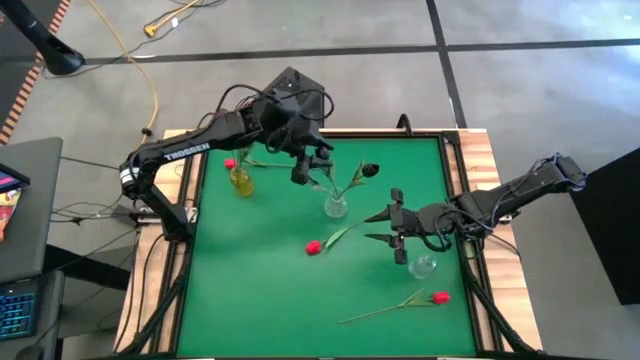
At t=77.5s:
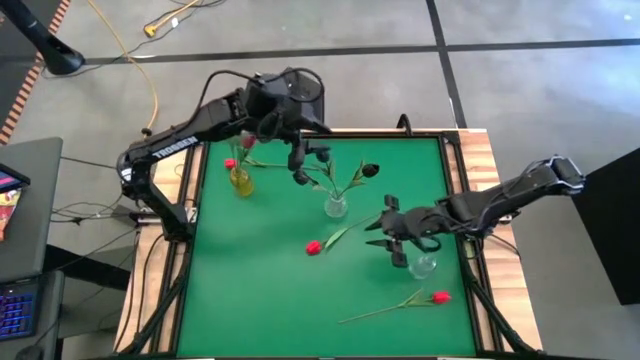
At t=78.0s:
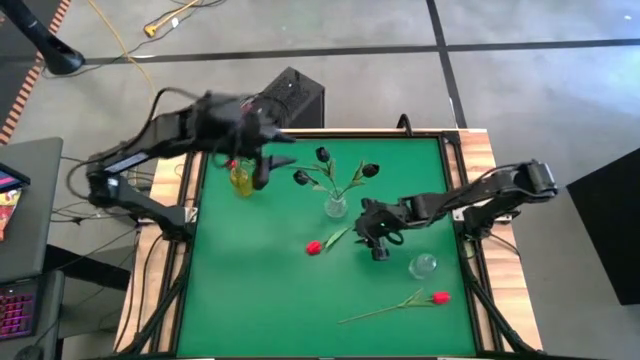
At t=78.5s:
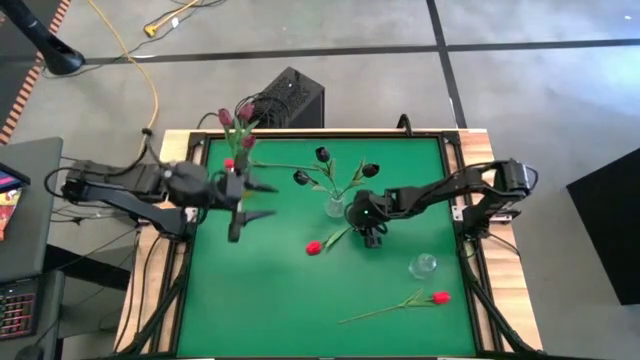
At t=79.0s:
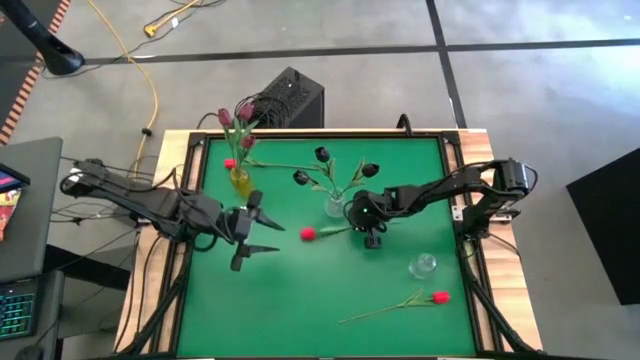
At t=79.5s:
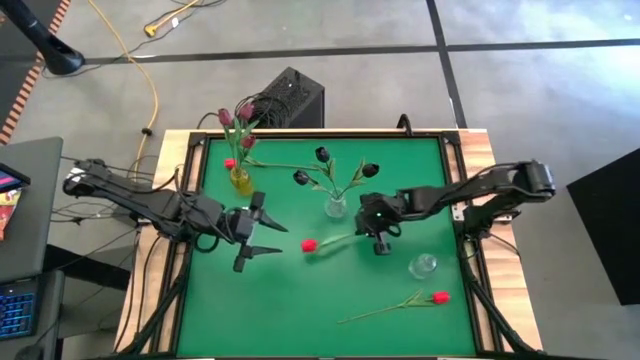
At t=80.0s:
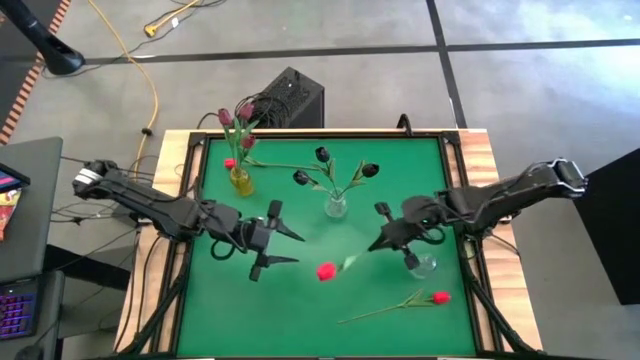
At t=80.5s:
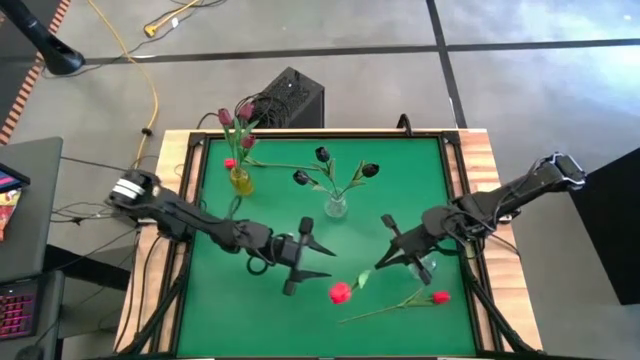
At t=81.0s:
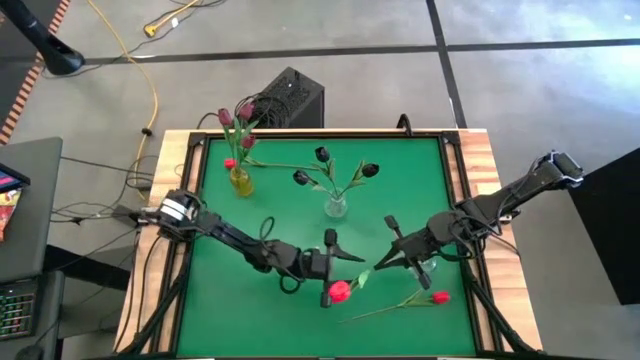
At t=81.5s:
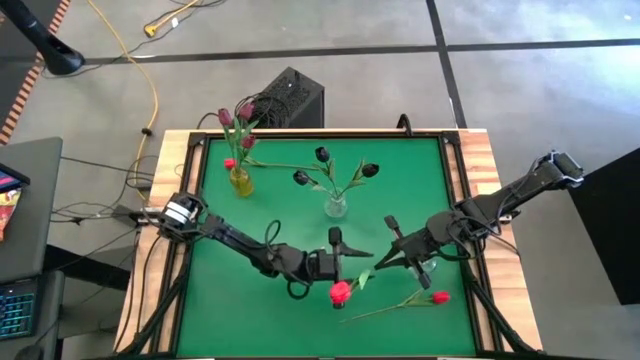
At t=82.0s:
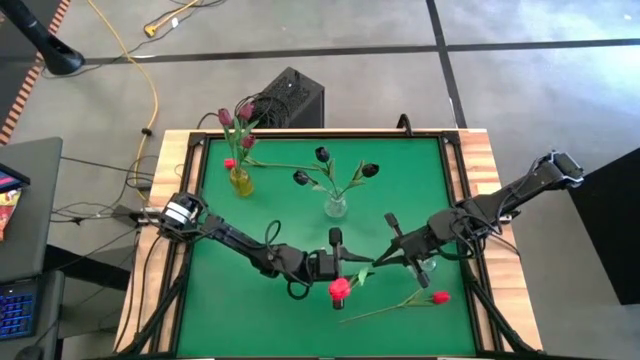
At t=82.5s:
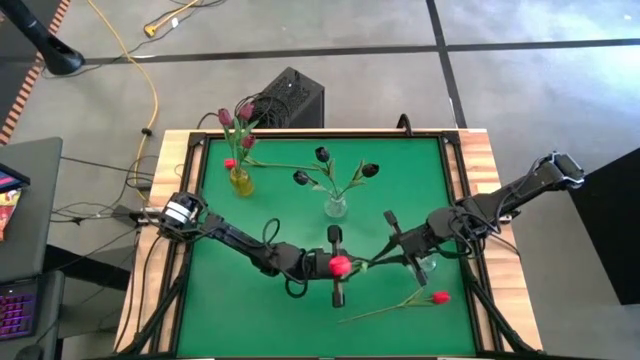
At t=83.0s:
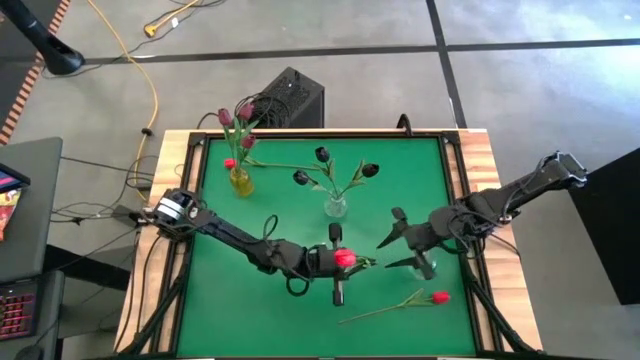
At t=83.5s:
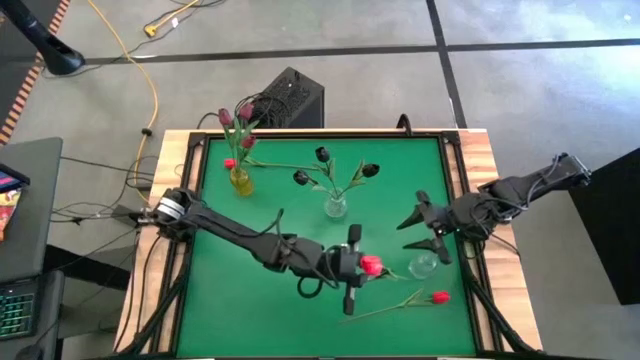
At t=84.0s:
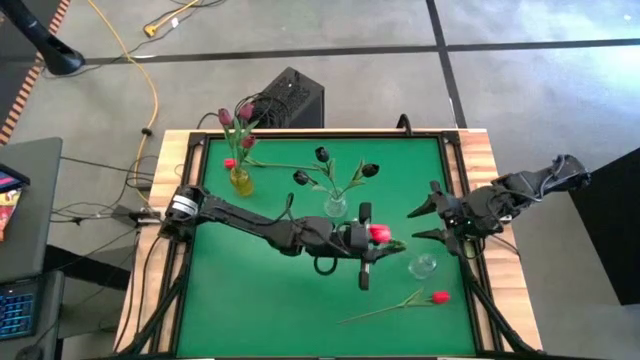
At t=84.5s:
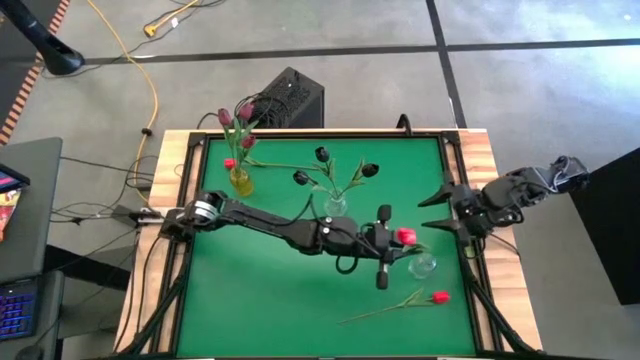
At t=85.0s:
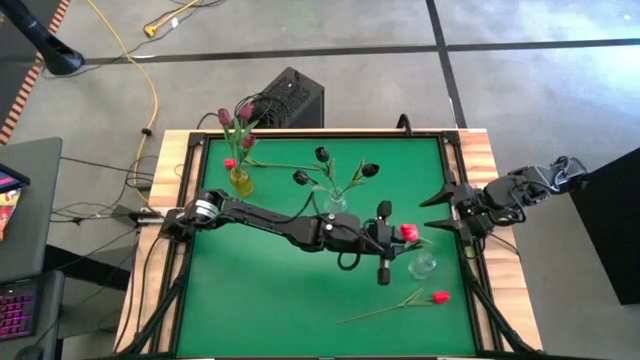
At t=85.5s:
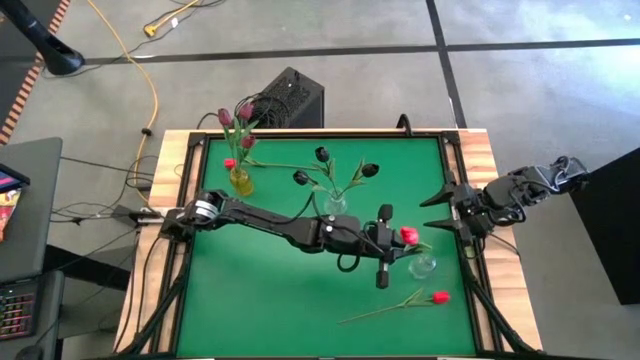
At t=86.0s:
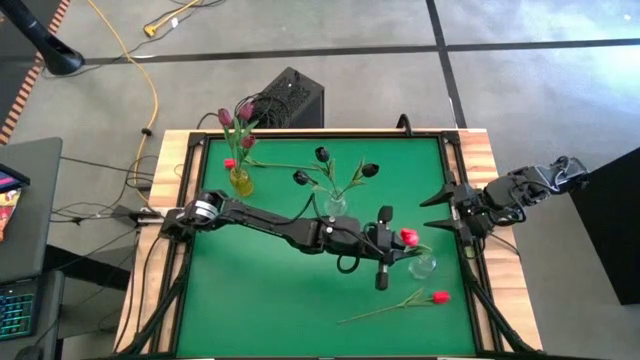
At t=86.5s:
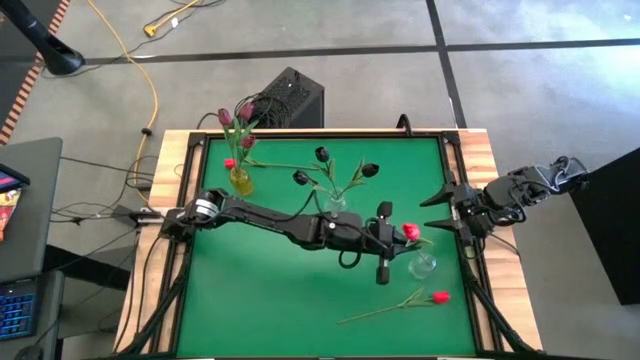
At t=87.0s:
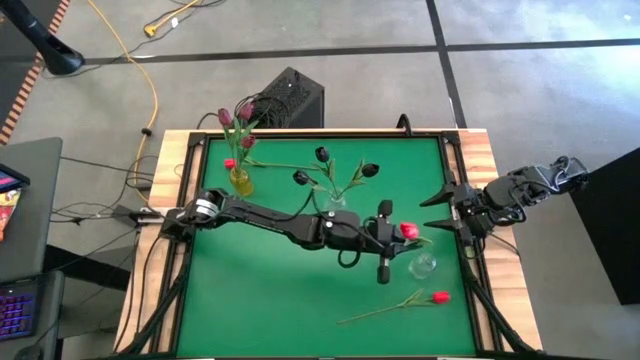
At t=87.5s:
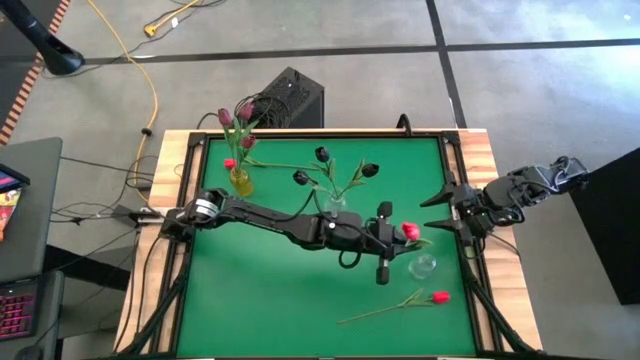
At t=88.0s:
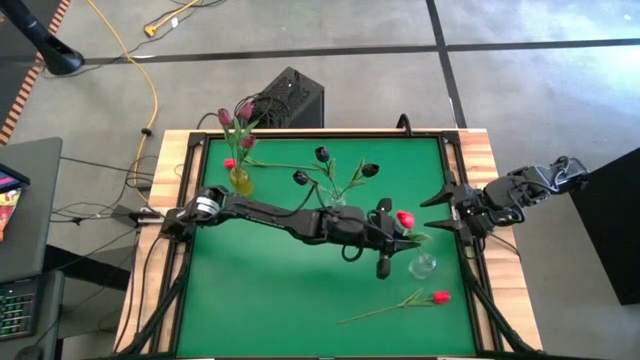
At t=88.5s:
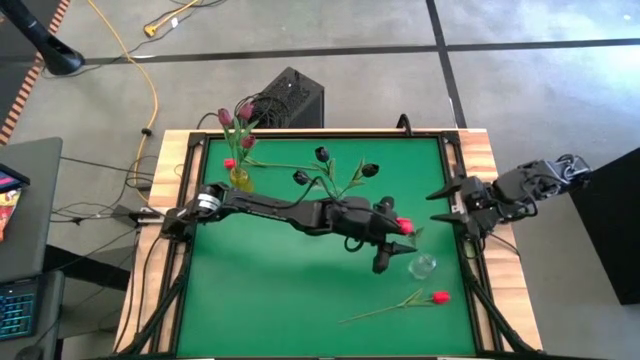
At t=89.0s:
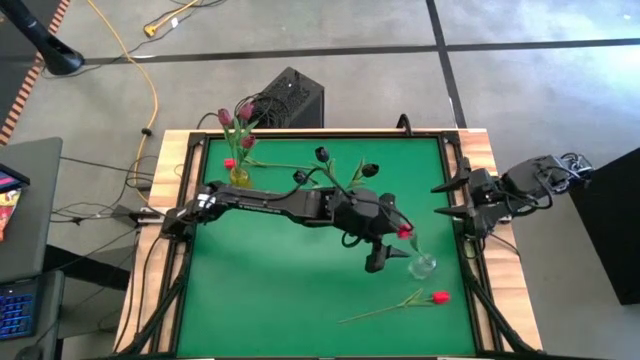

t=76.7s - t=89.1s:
Task: Sort flowers into vase by color
Put the center red flower into the right transparent vase

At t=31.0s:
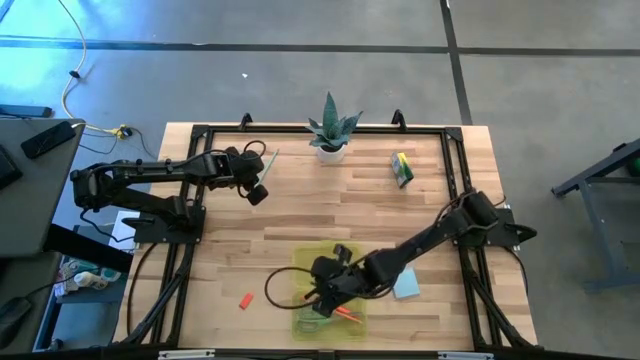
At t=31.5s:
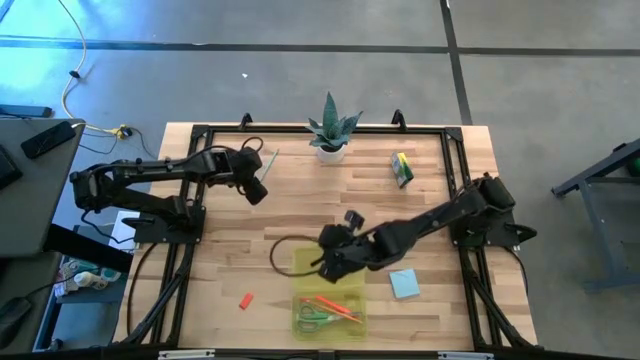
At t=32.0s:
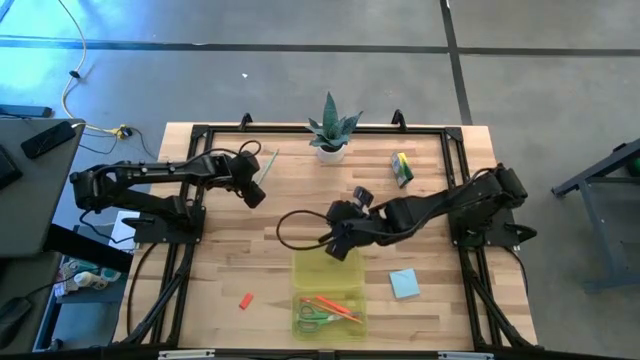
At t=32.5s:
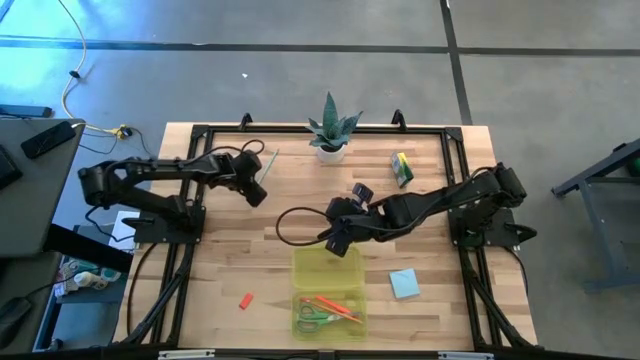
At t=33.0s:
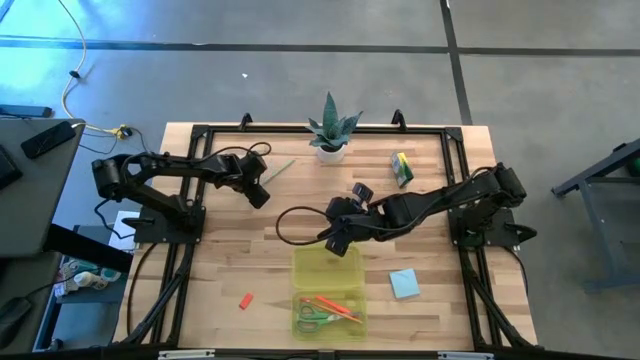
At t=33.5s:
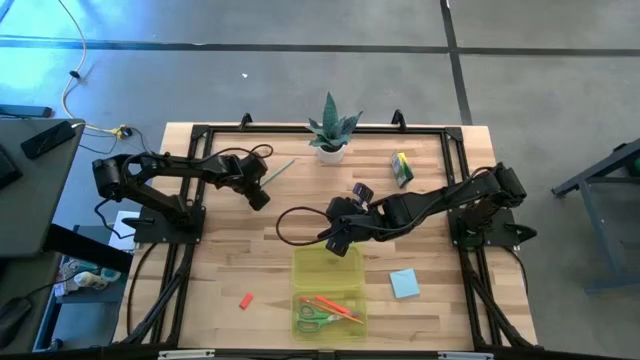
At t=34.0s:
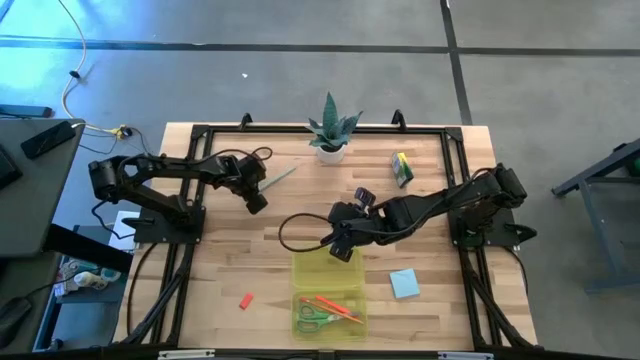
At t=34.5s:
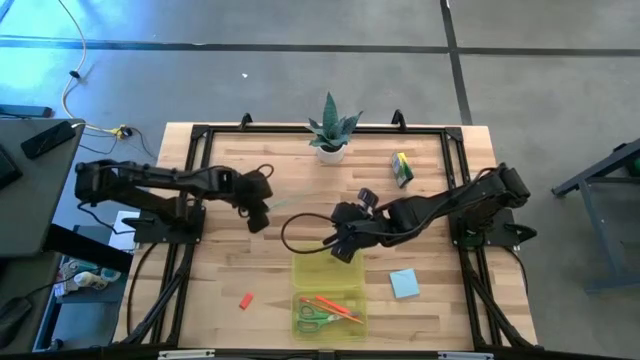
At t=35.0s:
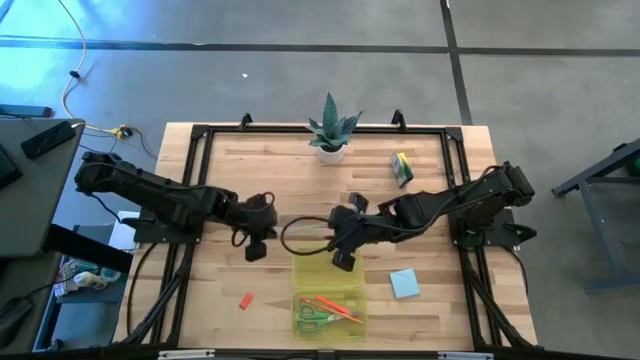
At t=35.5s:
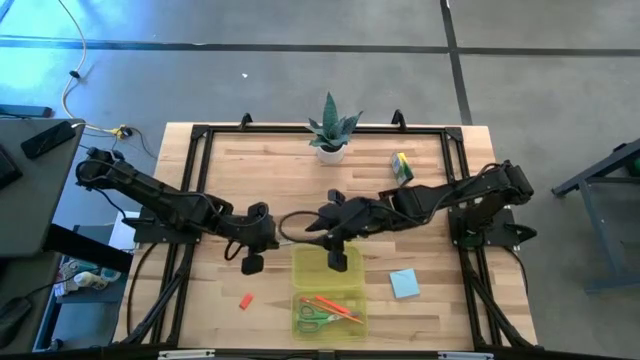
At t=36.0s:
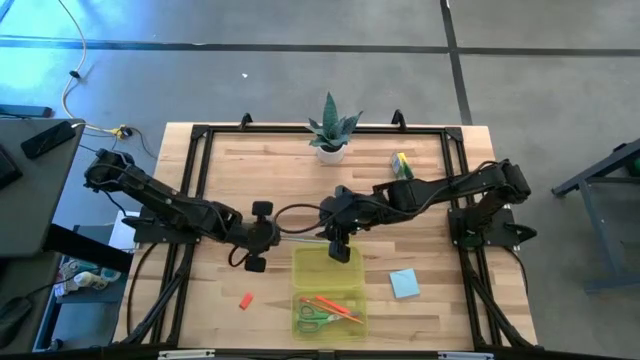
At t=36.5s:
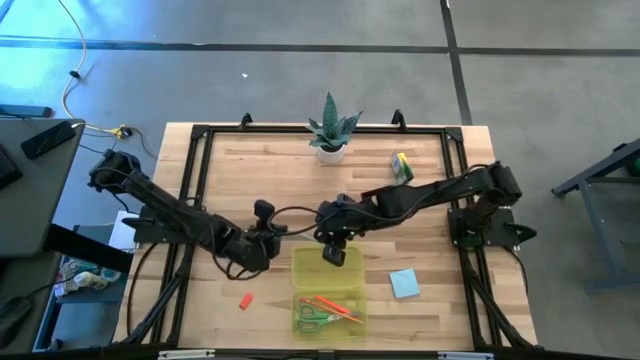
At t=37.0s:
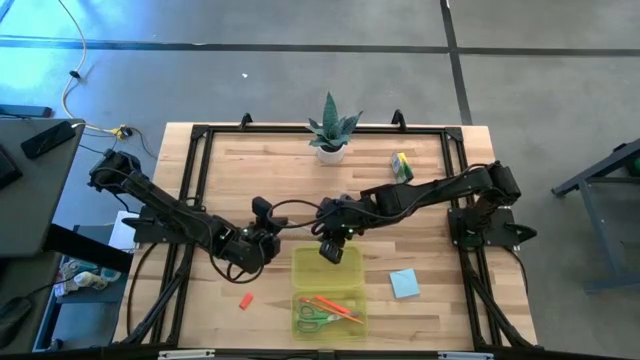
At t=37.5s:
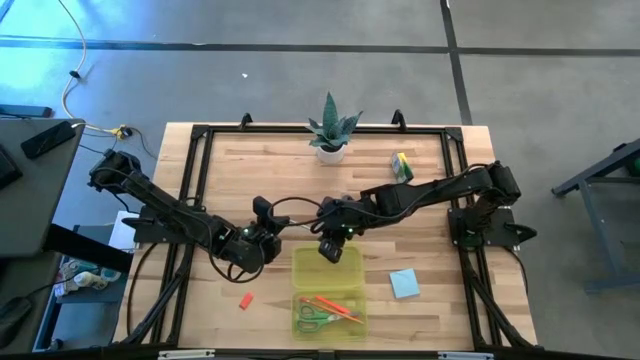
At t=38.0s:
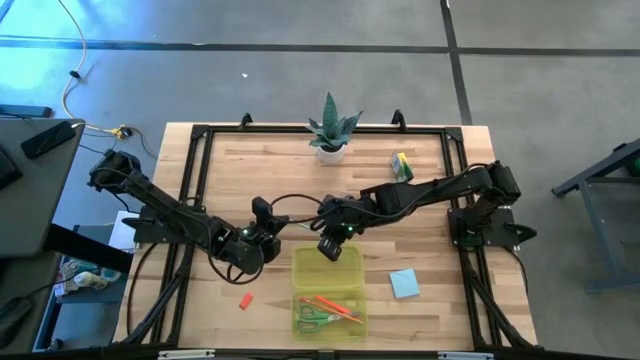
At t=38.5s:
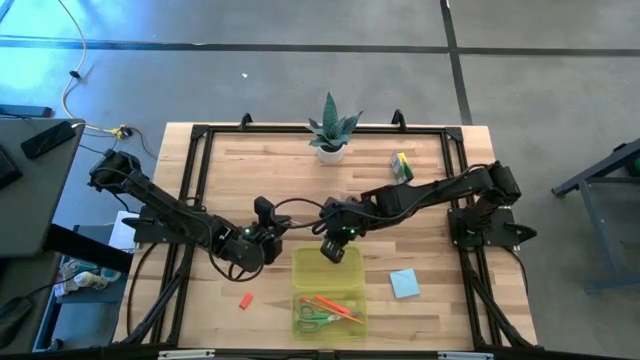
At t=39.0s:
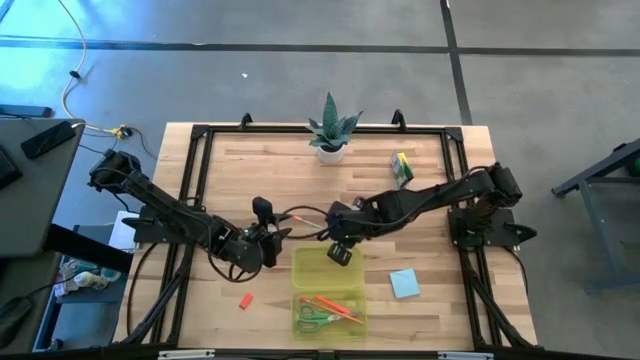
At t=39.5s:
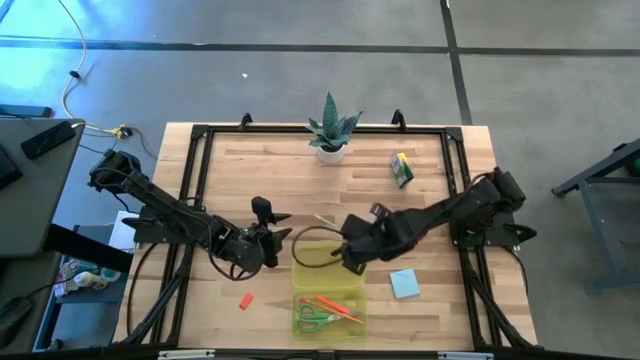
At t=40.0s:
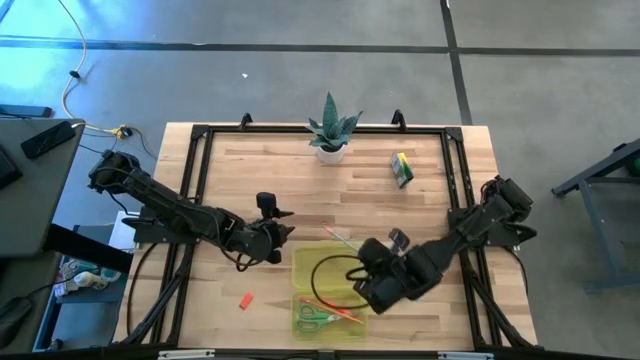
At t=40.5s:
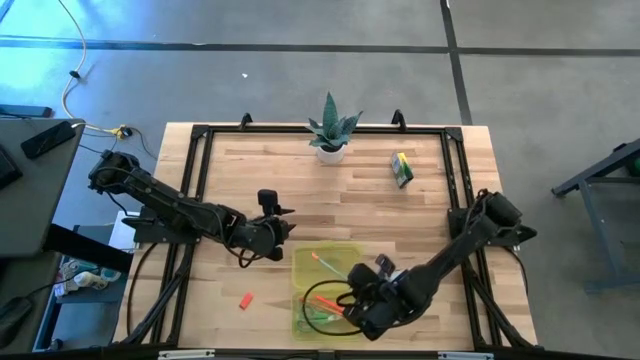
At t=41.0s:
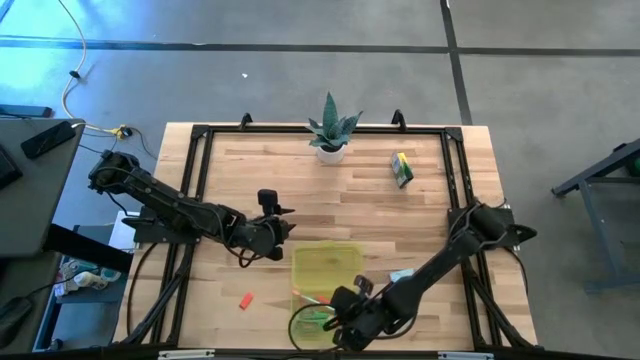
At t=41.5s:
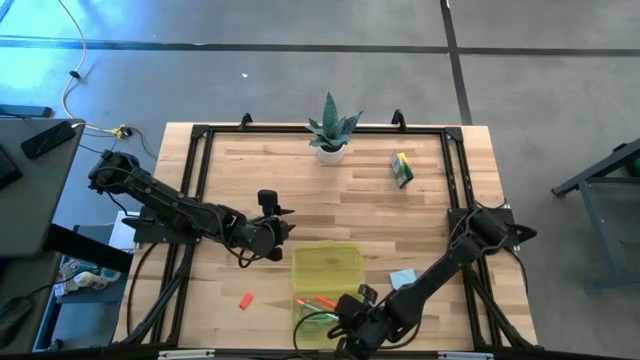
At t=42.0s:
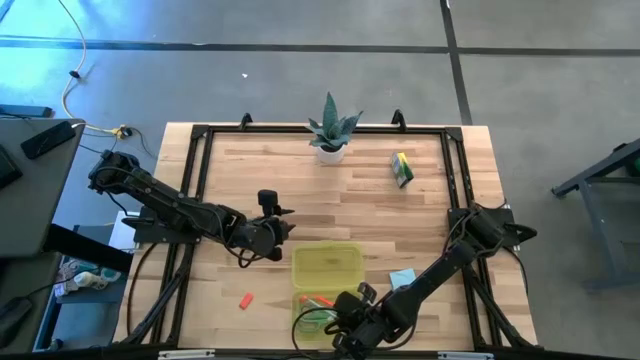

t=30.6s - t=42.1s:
Task: Pack school essentials
Put the blue pencil into the yellow supply box
